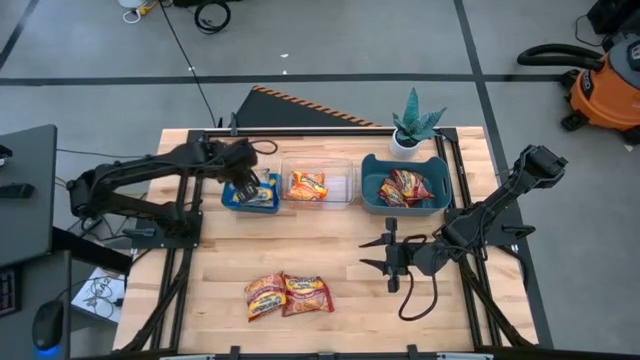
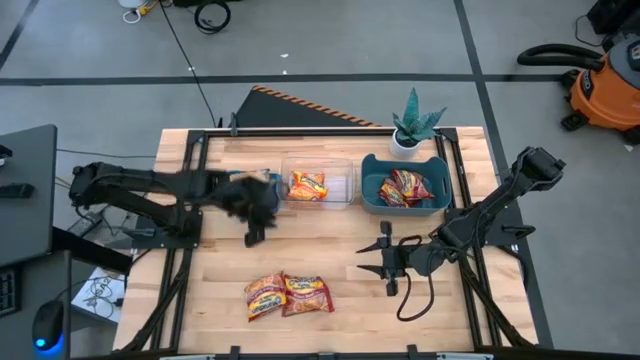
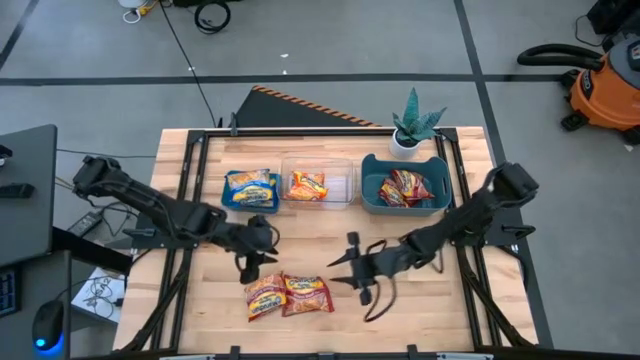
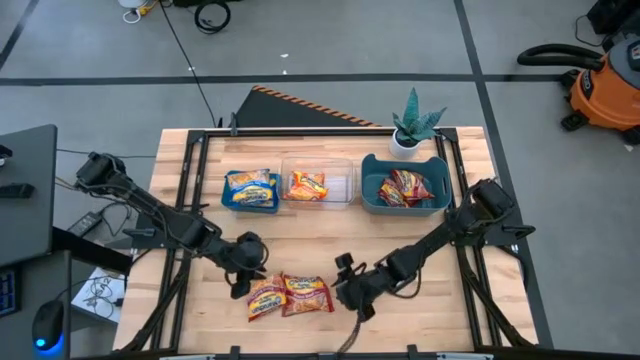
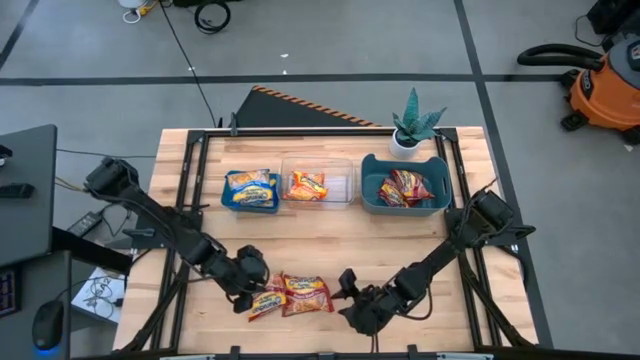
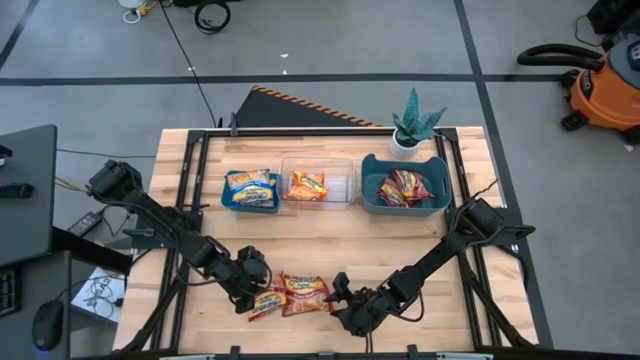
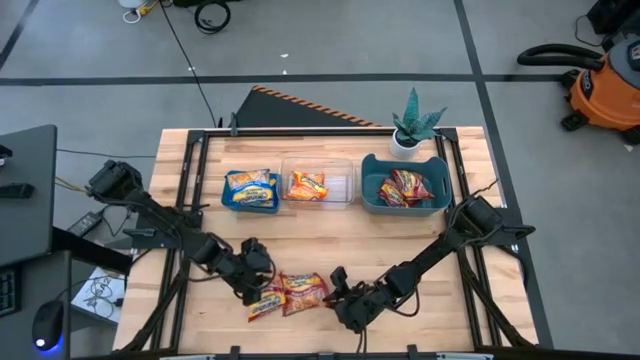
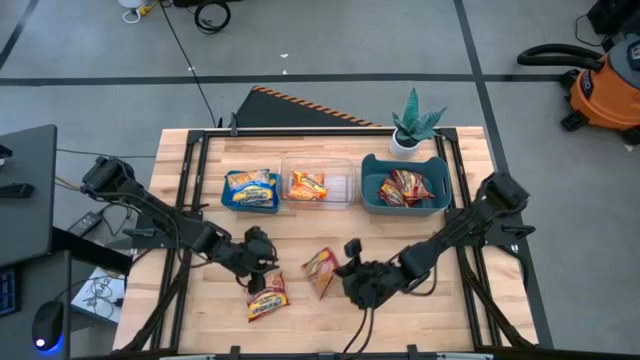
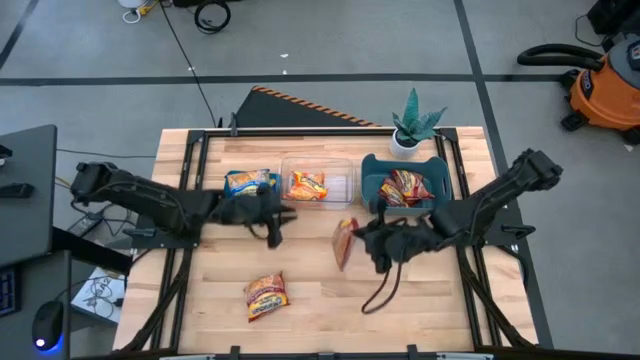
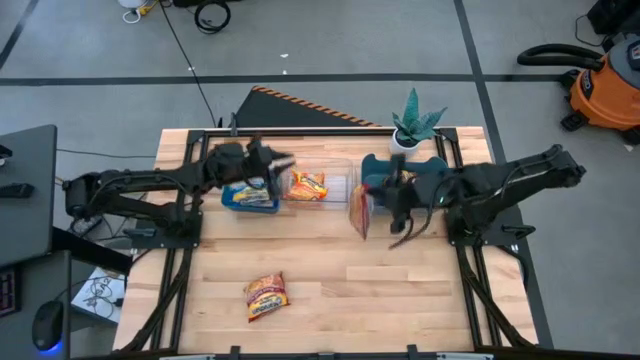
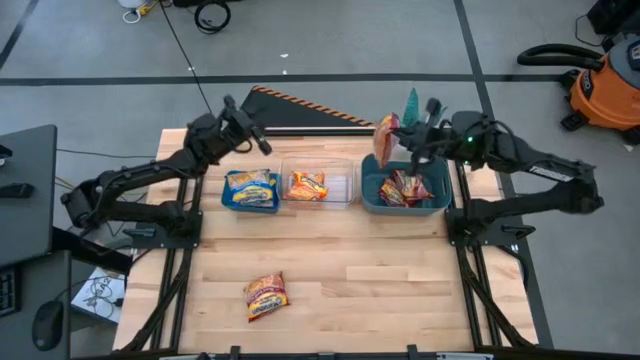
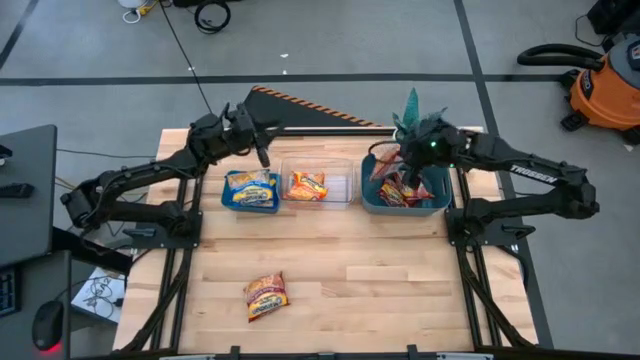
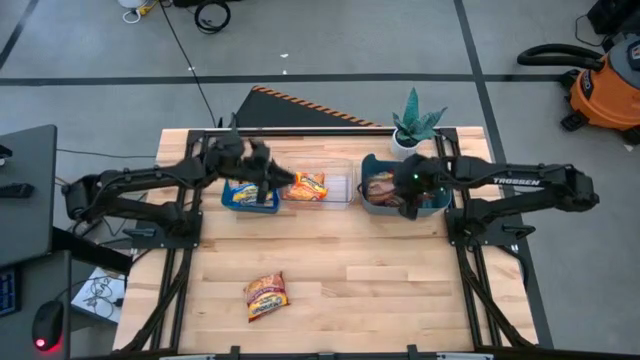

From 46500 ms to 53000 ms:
Task: Sort Maruchan noodles
Put the red noodle pack into the blue bin

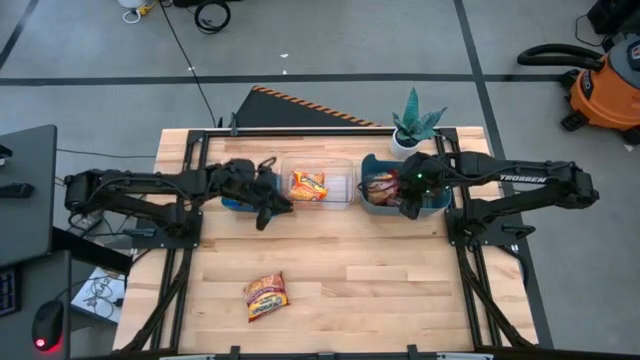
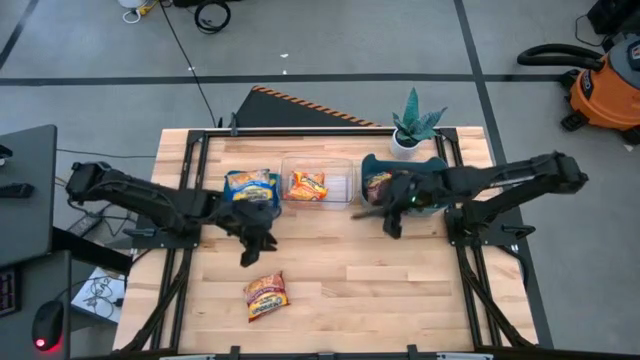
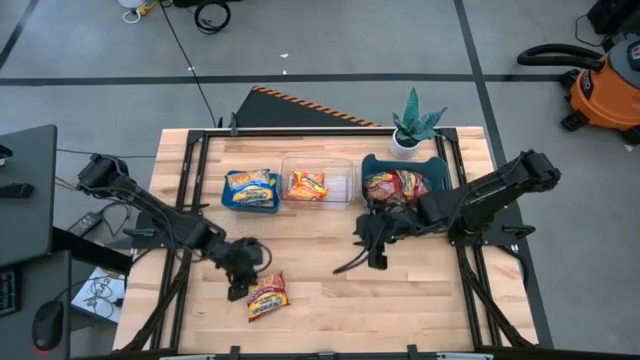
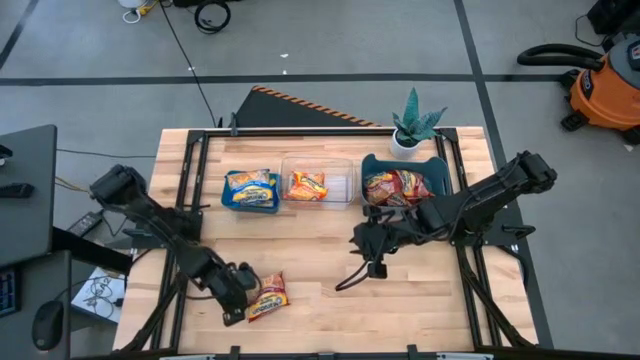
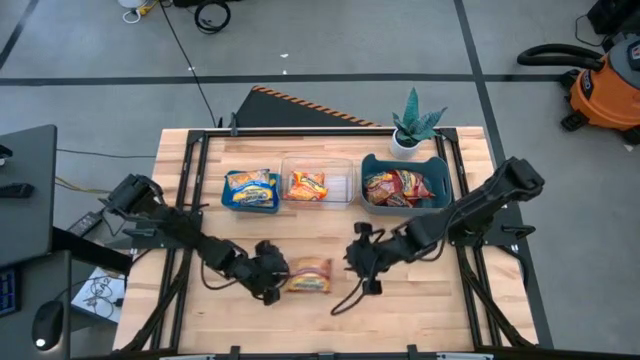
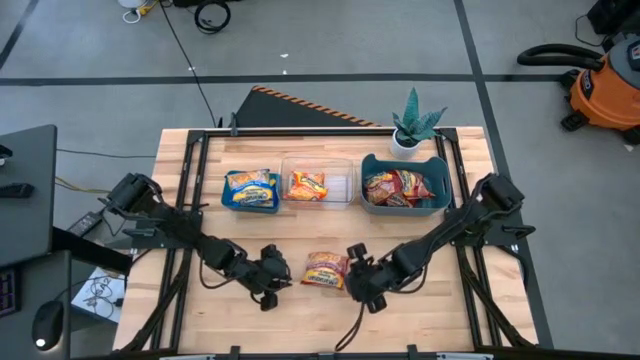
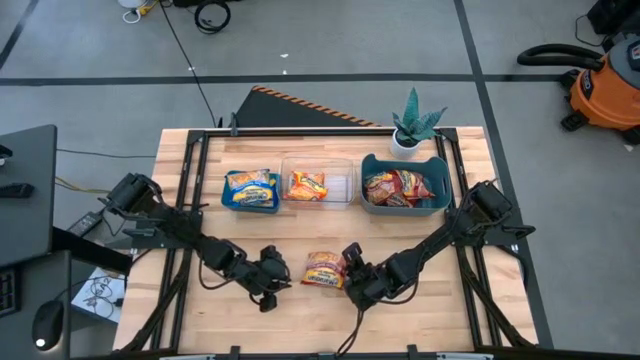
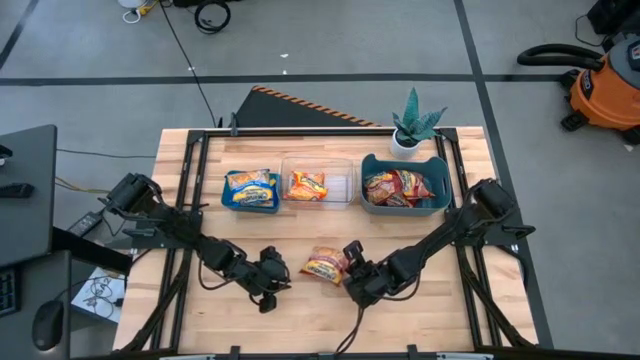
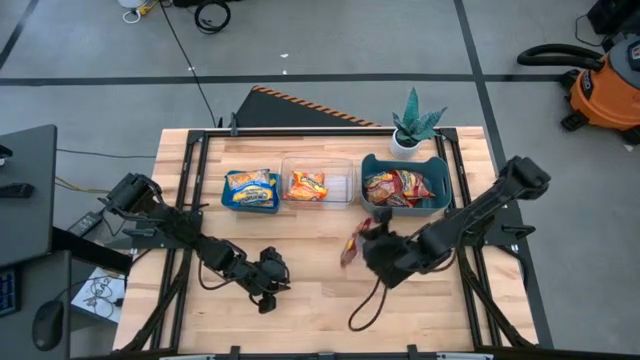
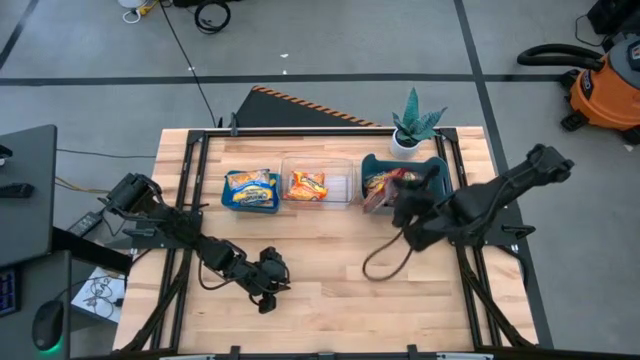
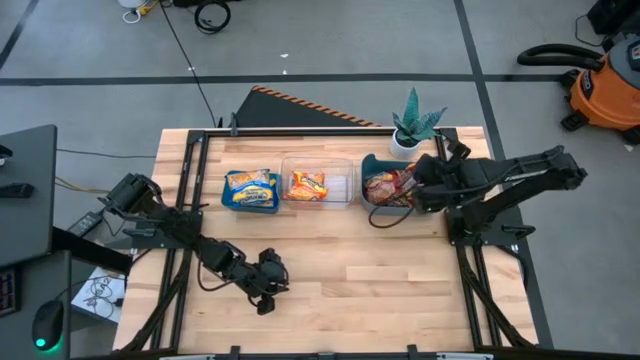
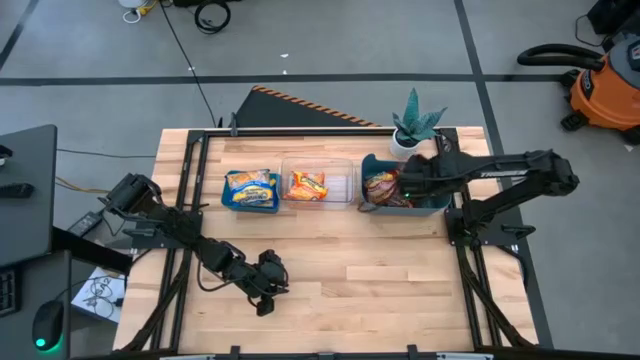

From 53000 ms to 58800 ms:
Put the red noodle pack into the green bin

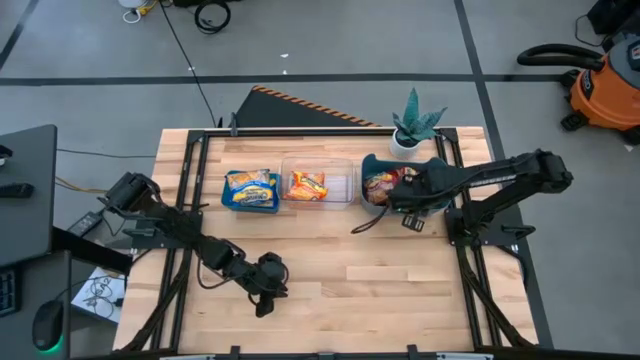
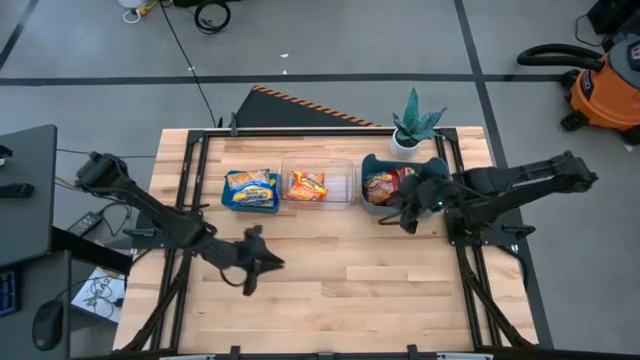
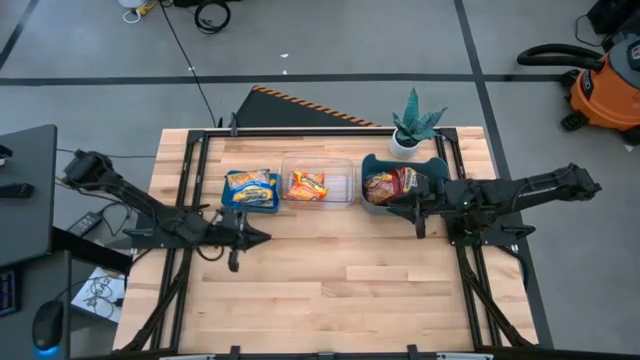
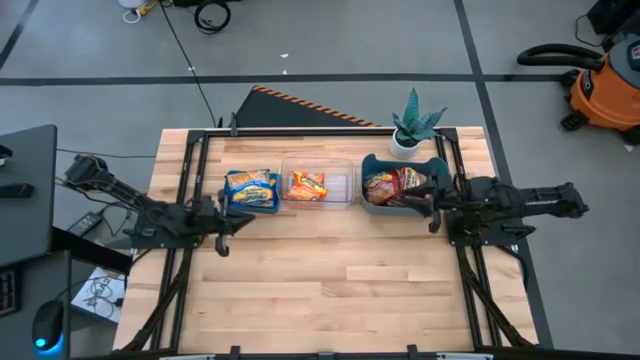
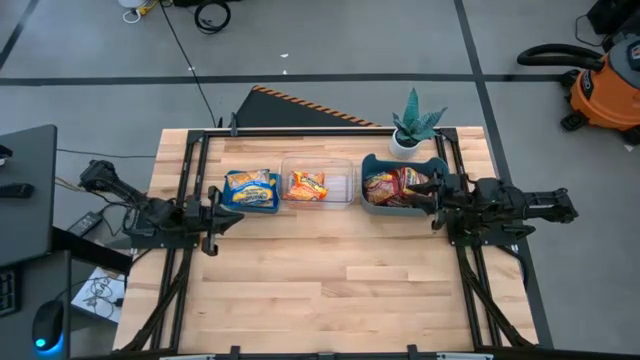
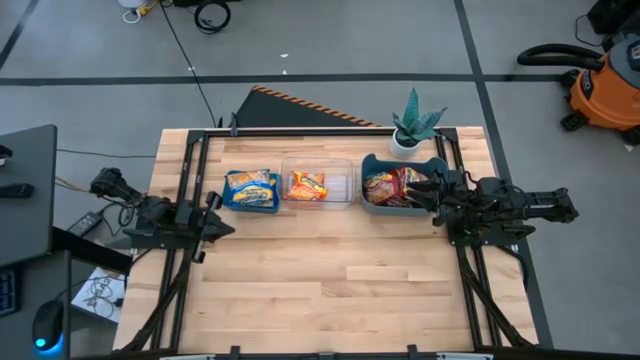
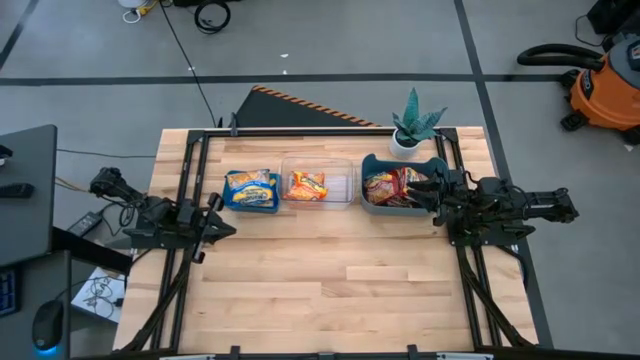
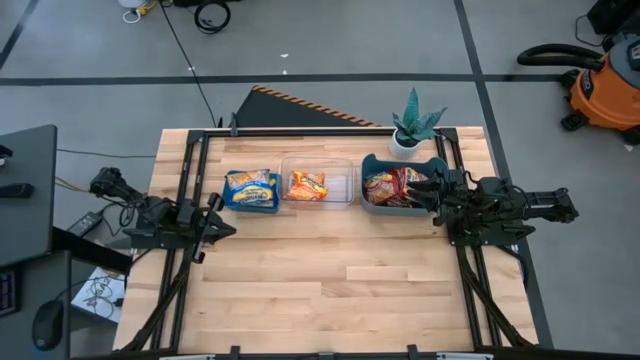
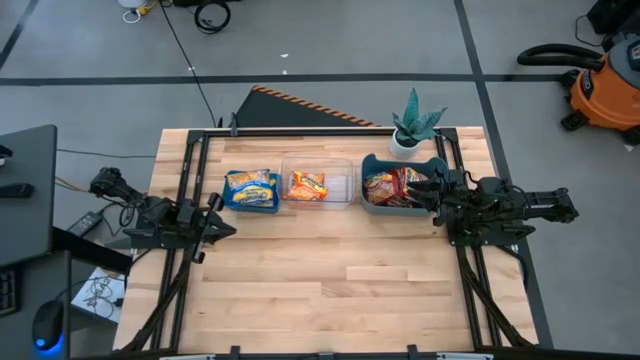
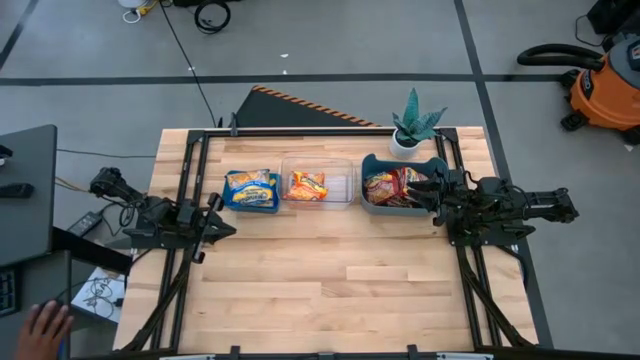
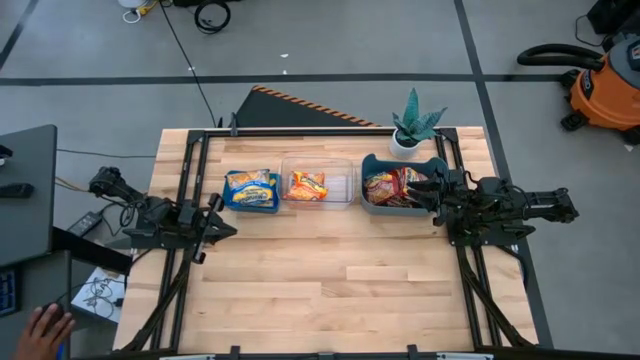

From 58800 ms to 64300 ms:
Return to Home Position

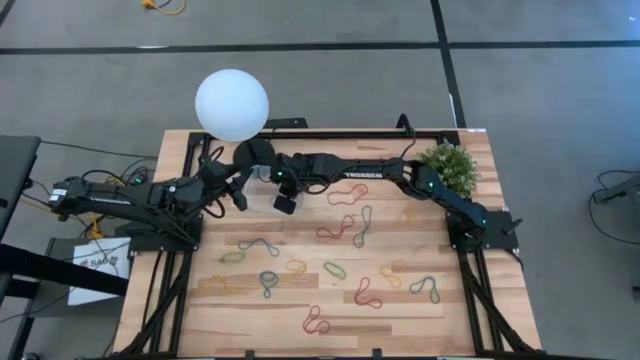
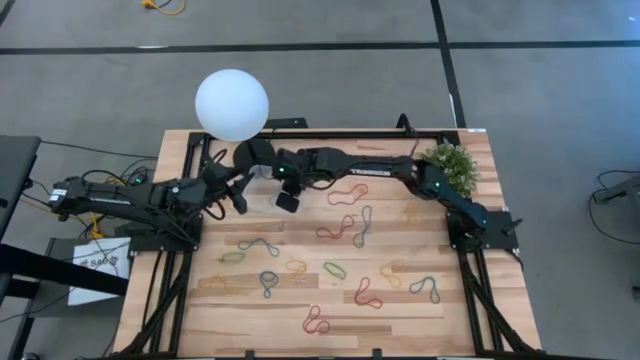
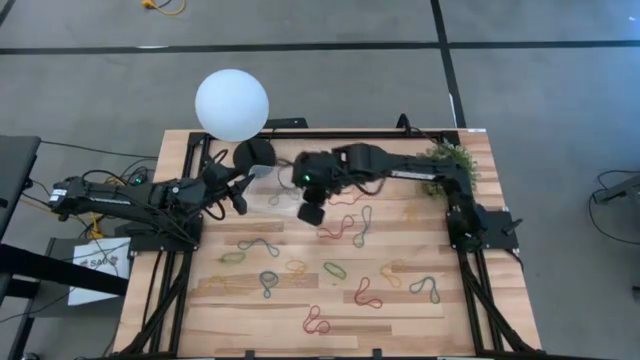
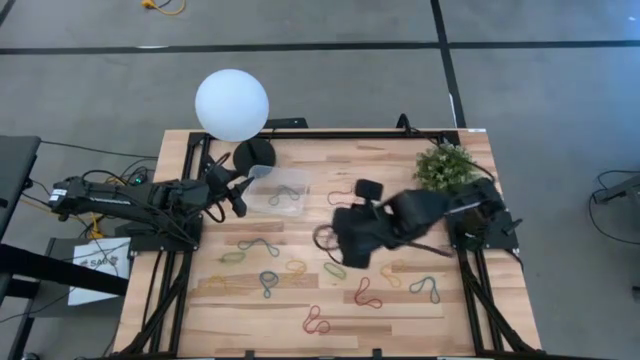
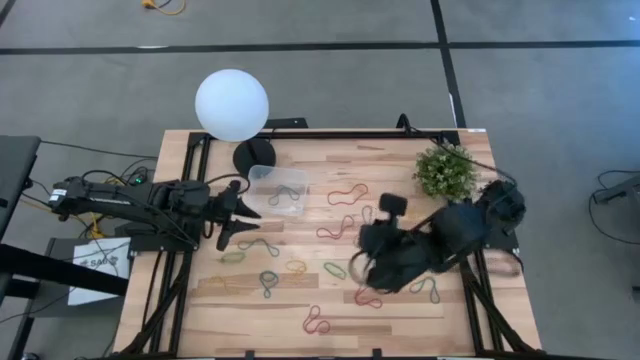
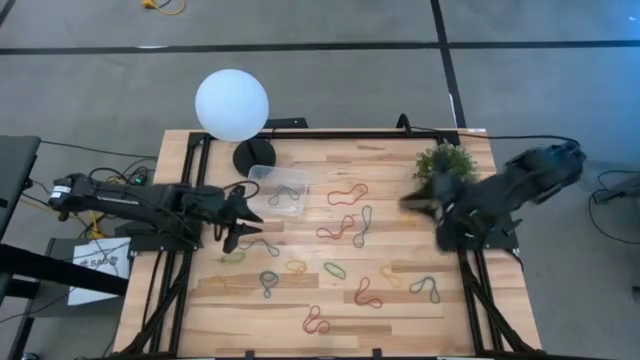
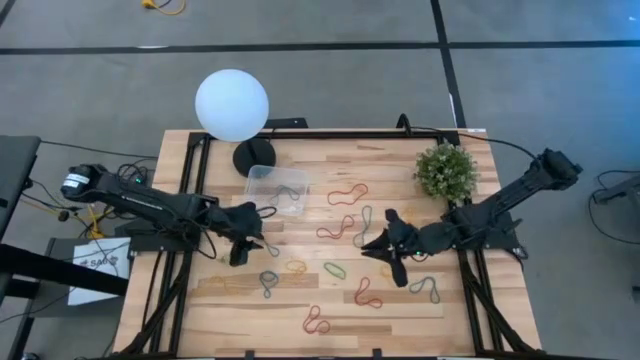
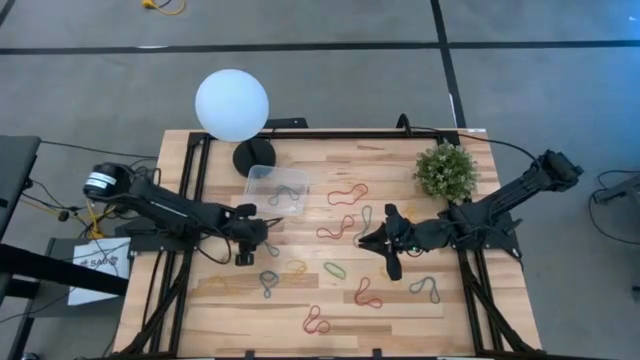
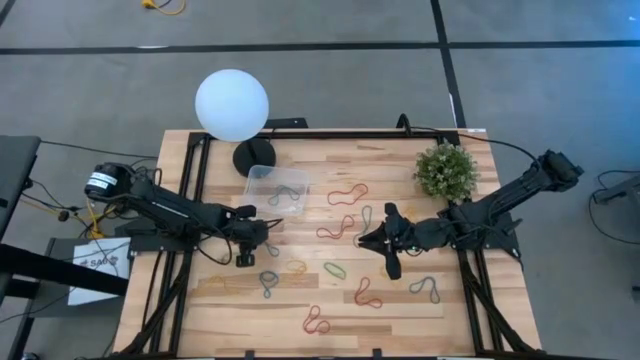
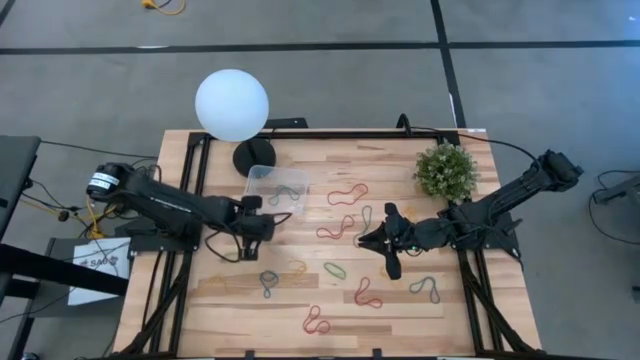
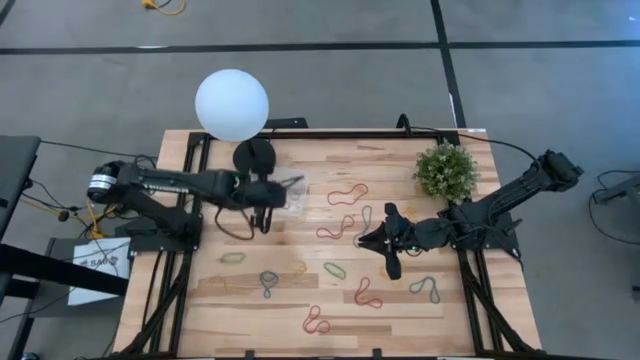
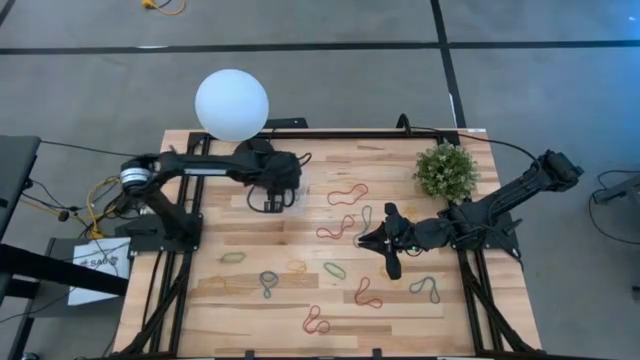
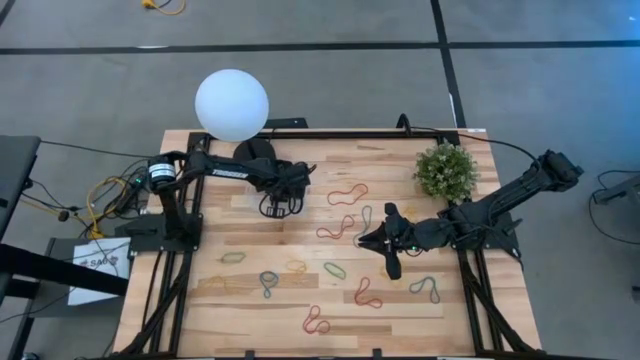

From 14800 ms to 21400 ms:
Task: Pick and place rubber bands into bin
Put the blue rubber band into the transparent container
